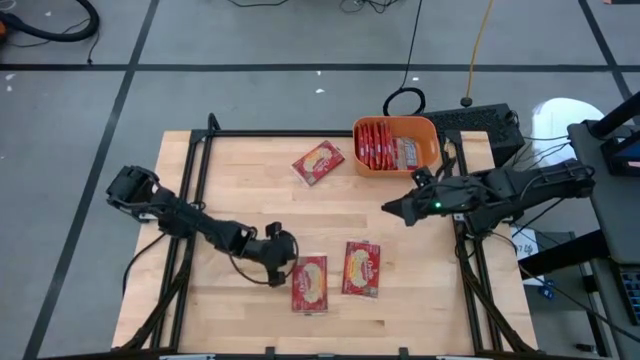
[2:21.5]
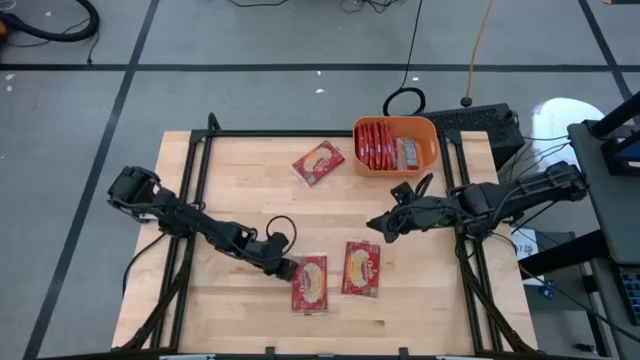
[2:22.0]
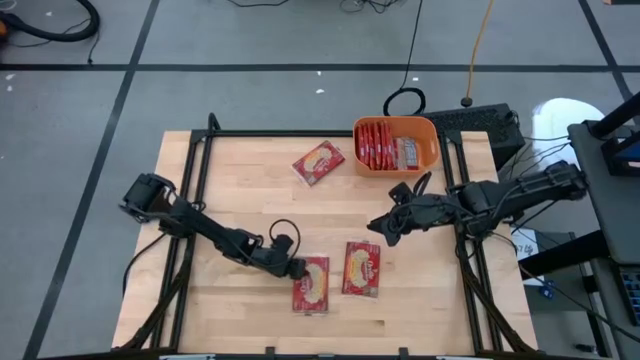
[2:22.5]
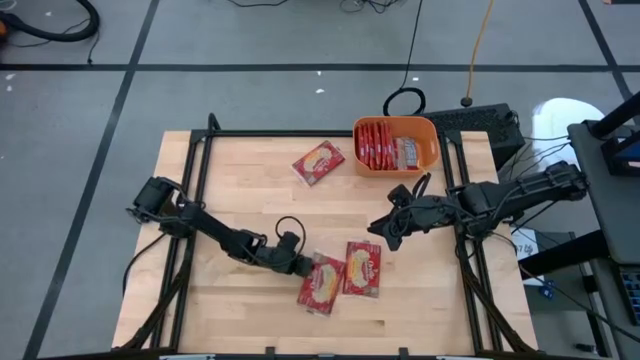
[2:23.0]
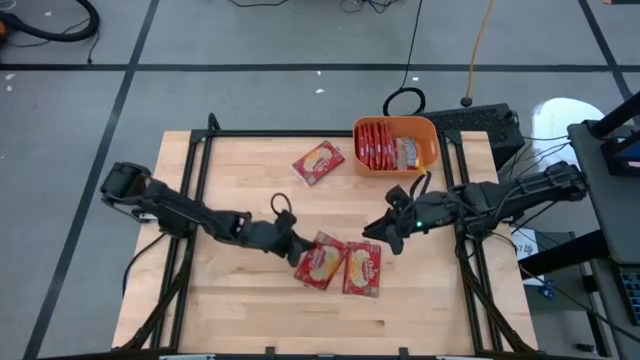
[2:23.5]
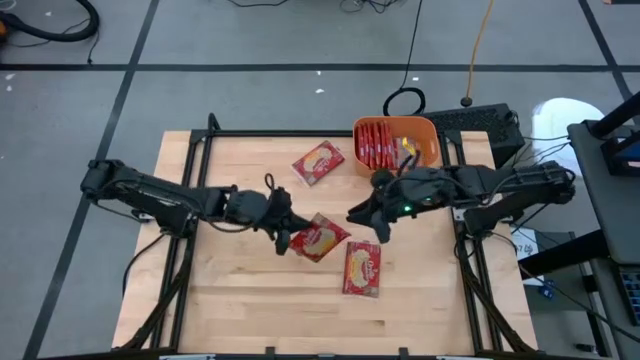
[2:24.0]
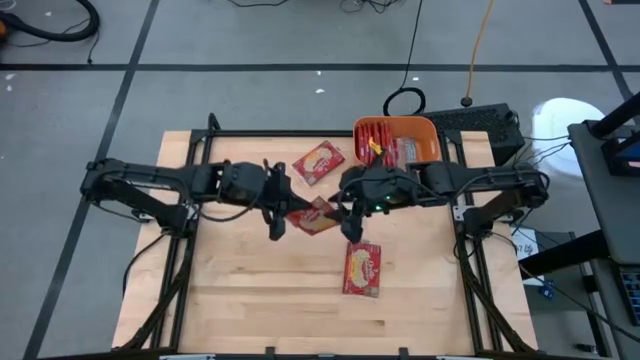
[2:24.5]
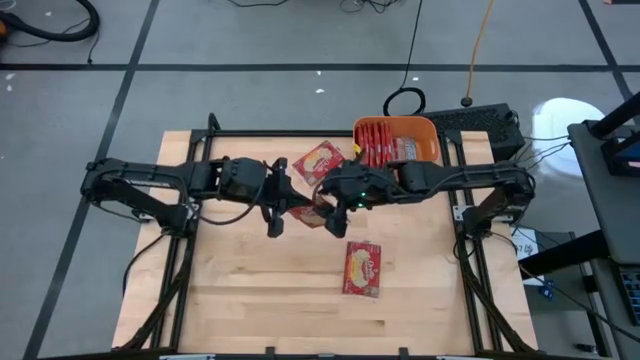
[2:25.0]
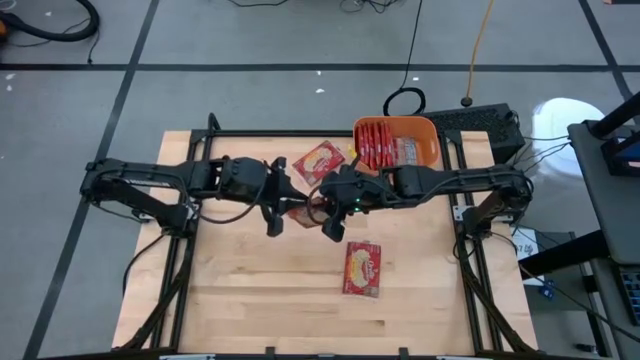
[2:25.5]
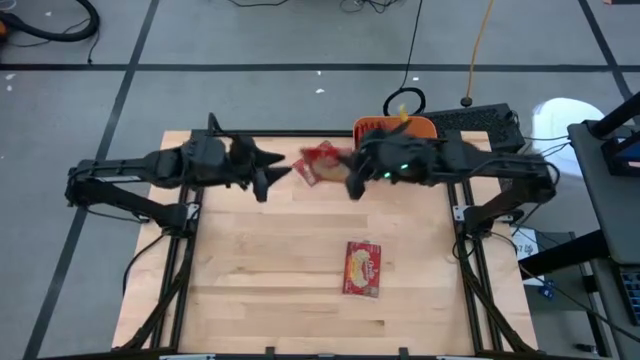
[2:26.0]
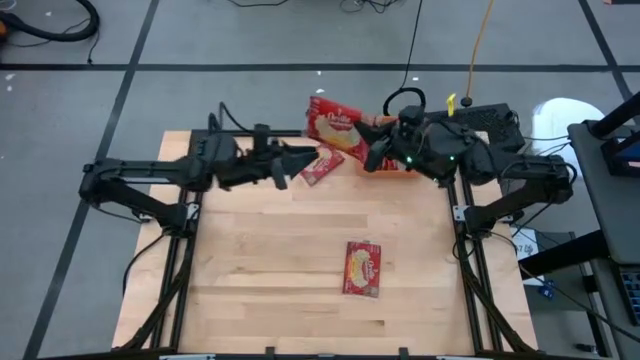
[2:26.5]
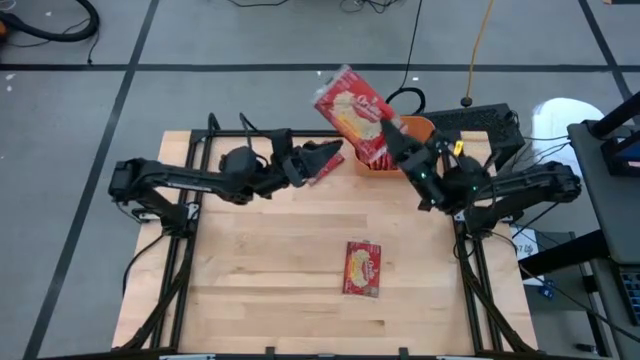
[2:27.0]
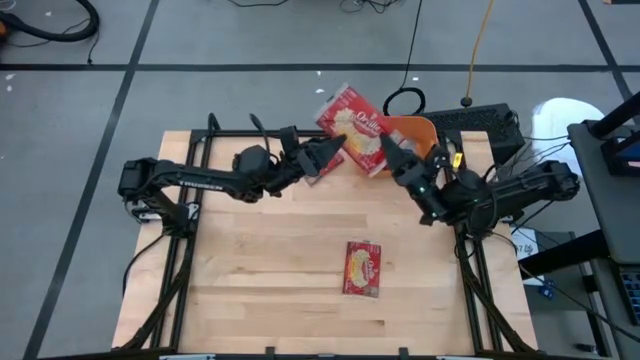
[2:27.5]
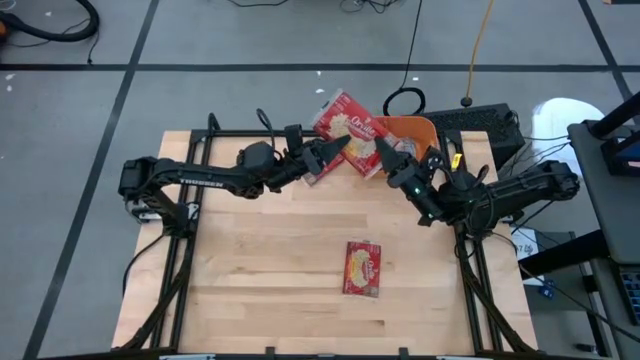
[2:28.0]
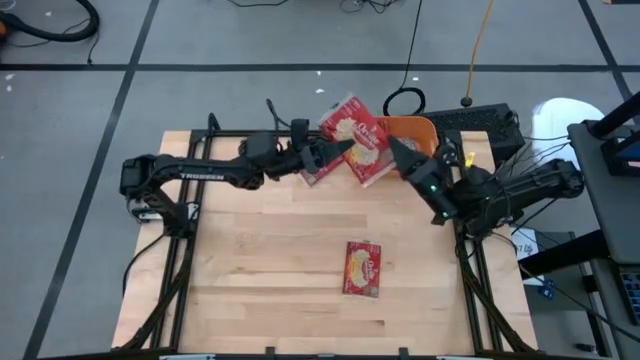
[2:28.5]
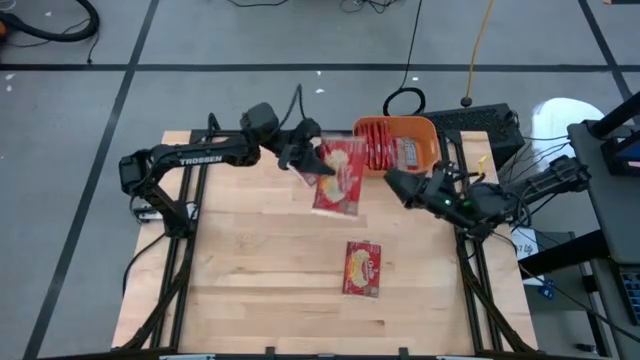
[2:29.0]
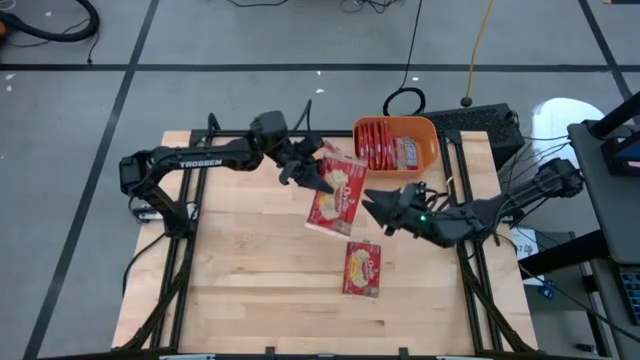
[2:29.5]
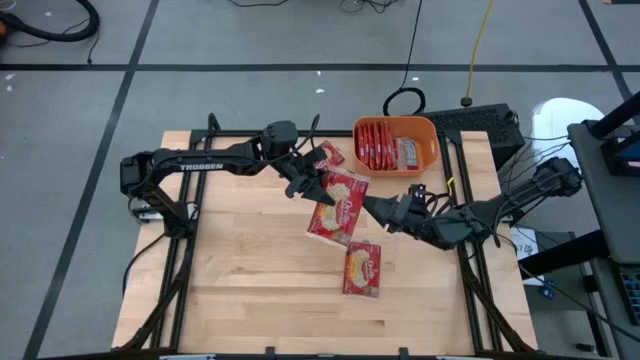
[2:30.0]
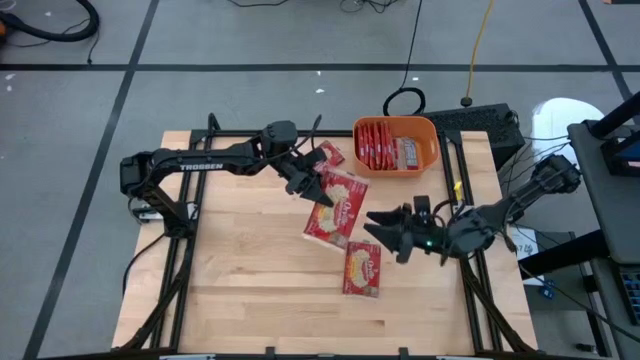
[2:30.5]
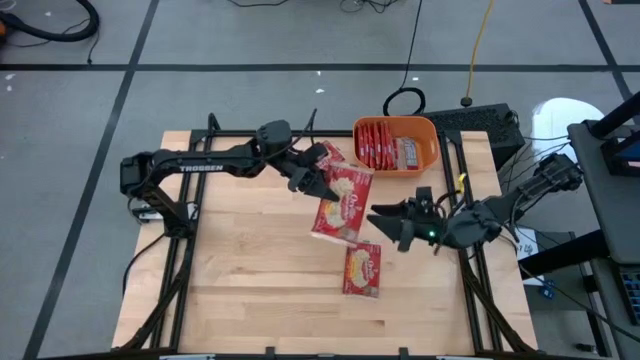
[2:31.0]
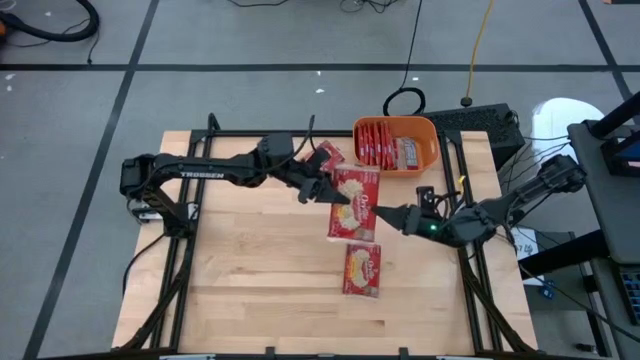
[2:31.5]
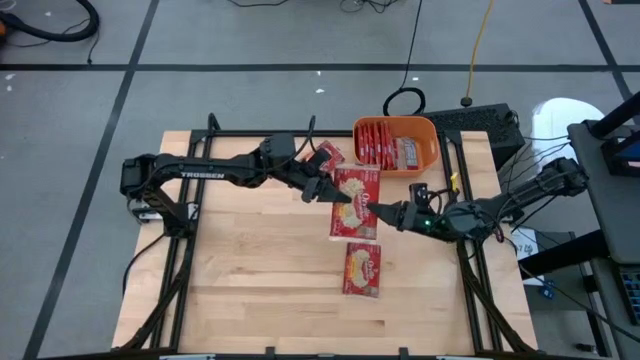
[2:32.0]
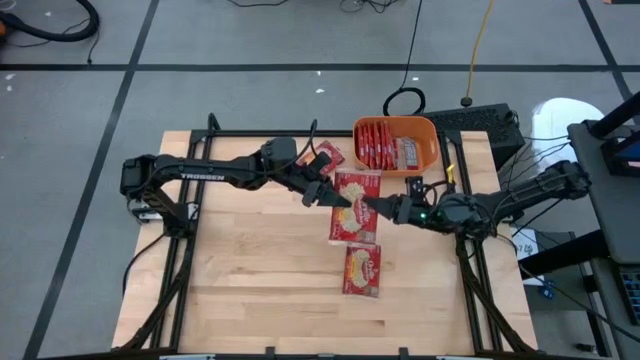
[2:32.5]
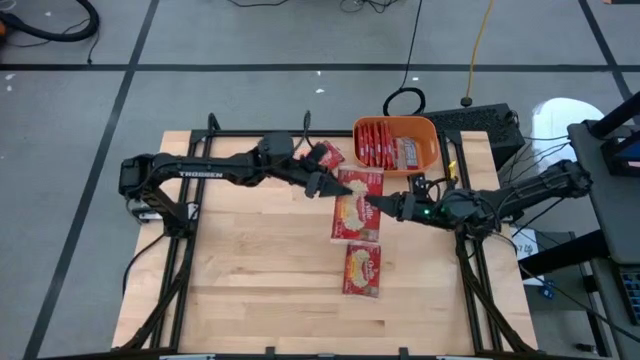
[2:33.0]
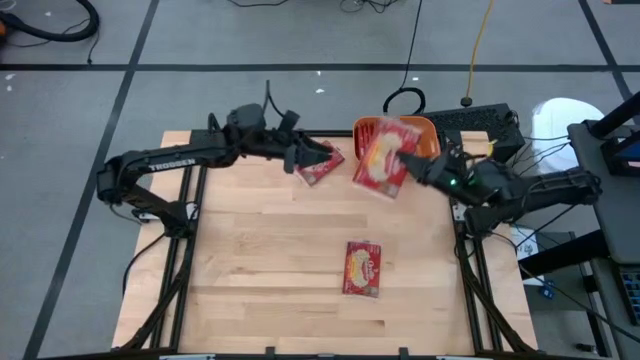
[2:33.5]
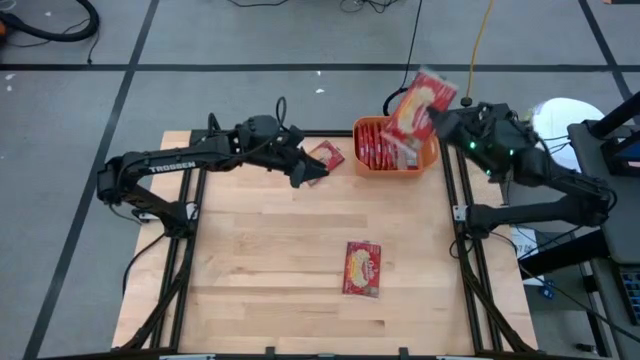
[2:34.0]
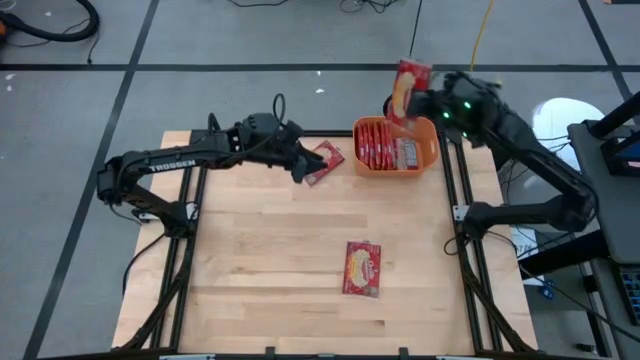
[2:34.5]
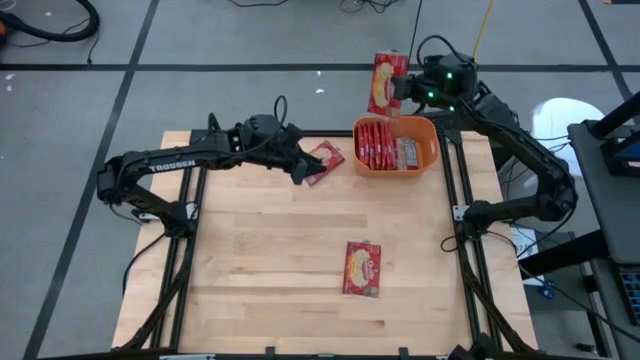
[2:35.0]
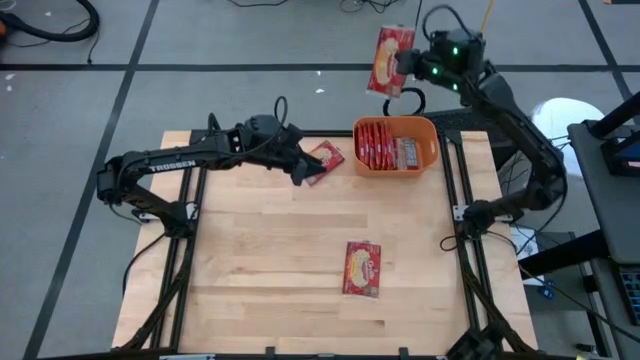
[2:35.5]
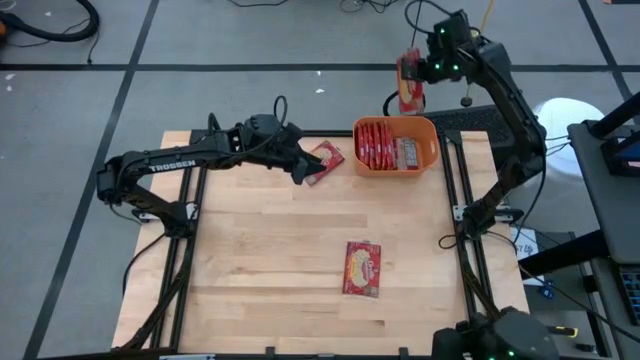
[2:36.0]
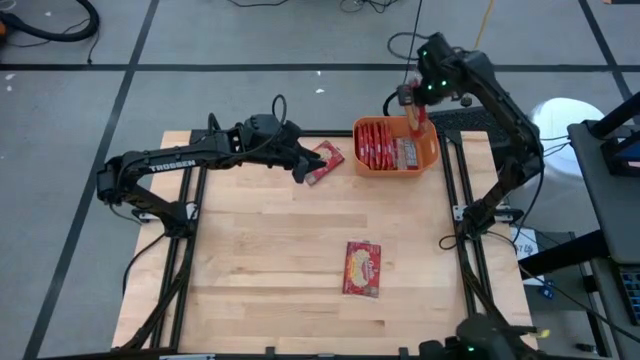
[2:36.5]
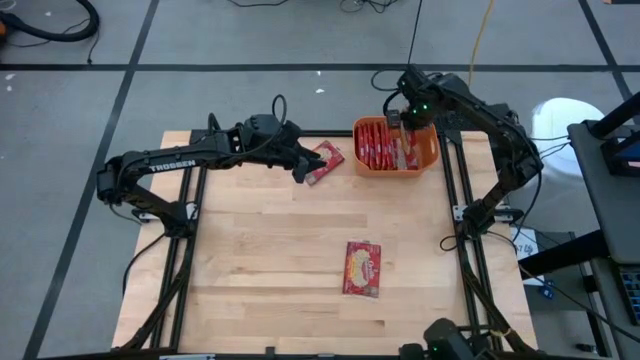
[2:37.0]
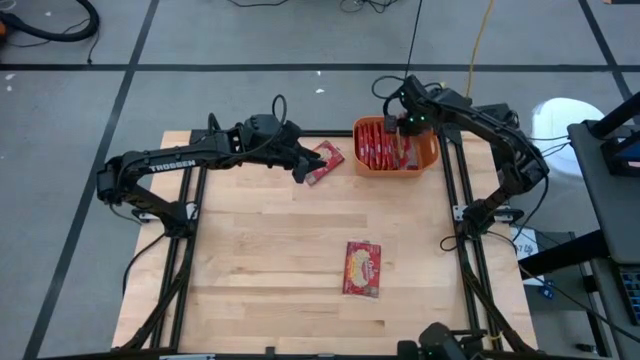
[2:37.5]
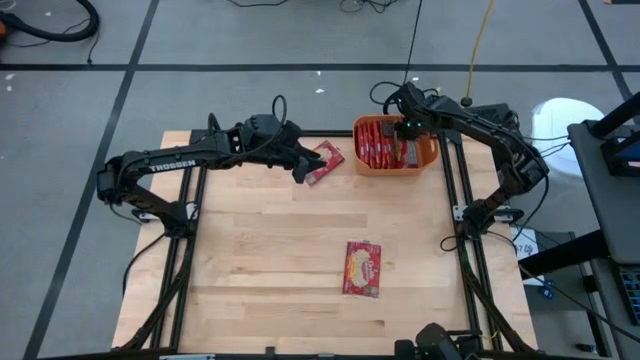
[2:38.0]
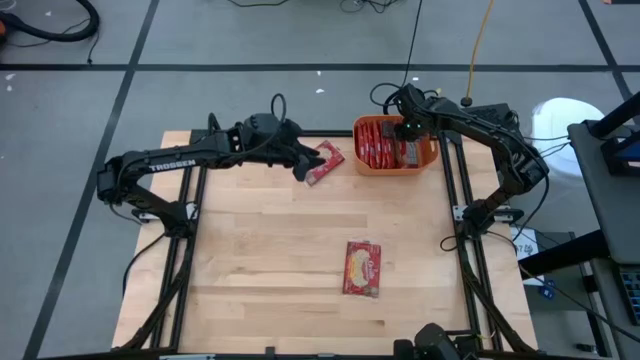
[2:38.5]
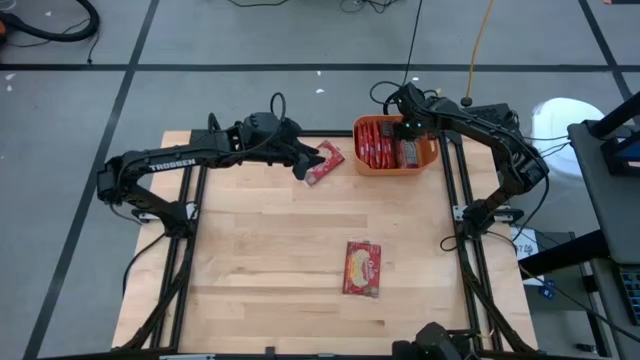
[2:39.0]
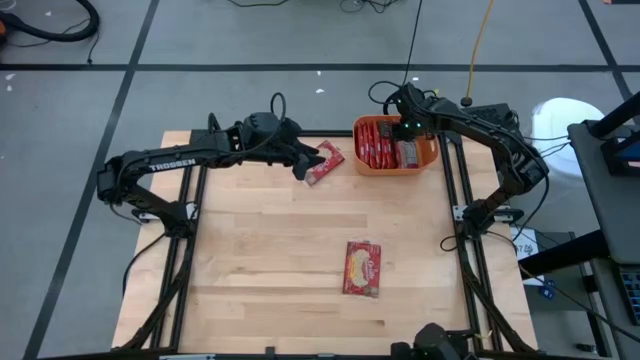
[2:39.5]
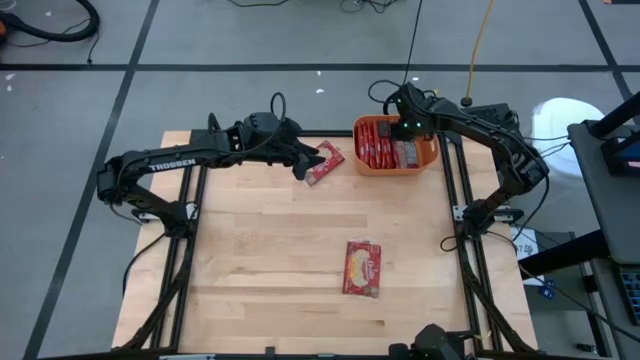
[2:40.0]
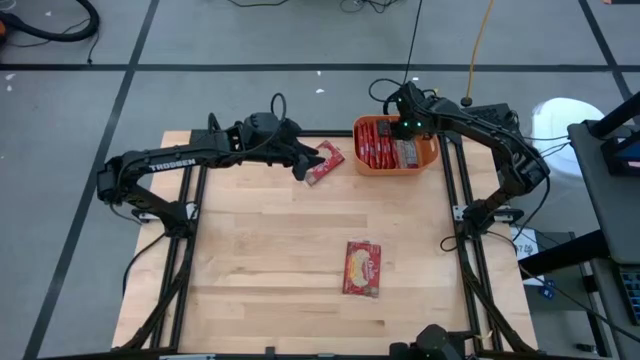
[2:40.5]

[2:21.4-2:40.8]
Task: Sort popcorn bags into baskets
Put the red popcorn bag into the orange bin

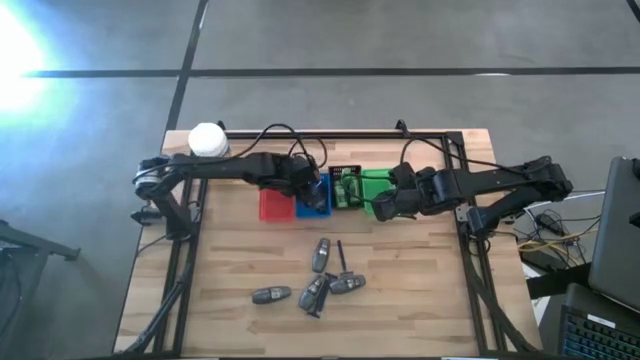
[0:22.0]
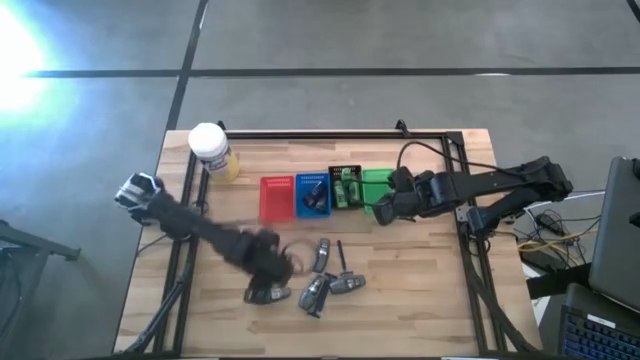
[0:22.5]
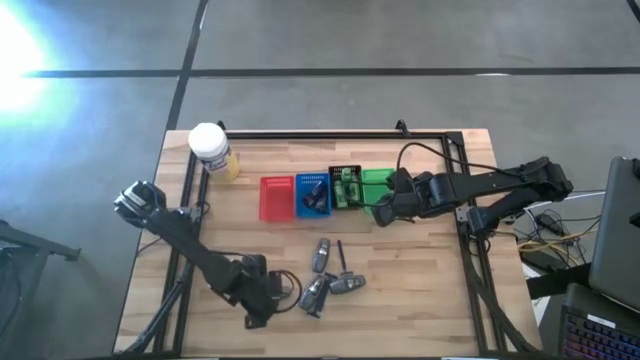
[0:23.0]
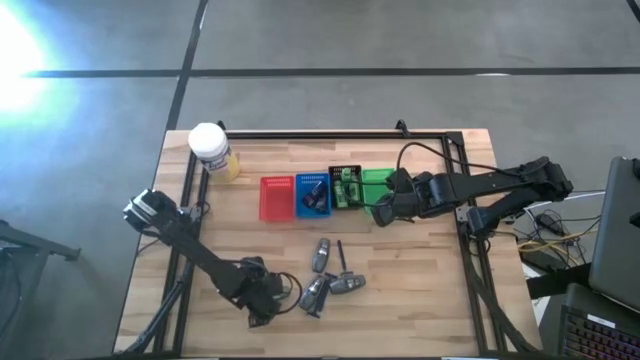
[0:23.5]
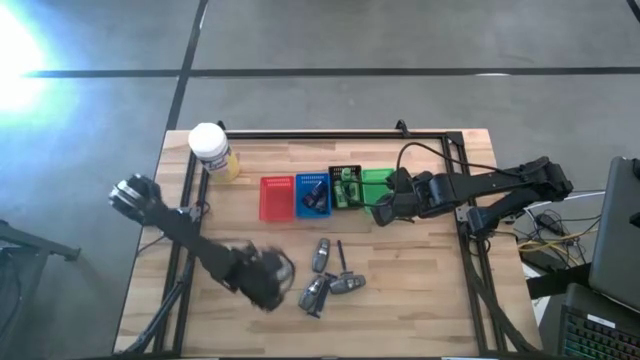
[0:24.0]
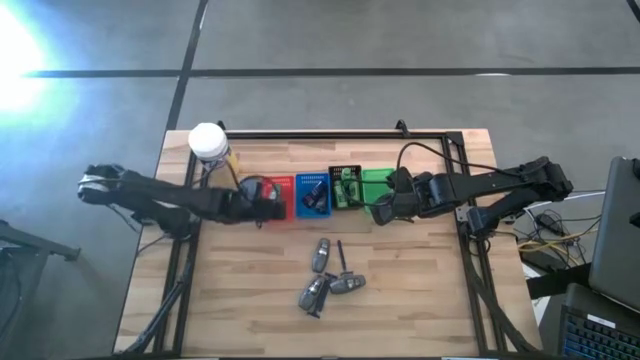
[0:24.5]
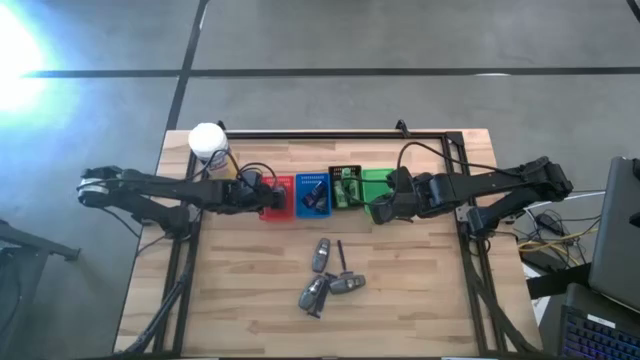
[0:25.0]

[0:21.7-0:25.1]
Task: Pick & Place Travel size toiletries
Put the gray deodorant into the red bin
